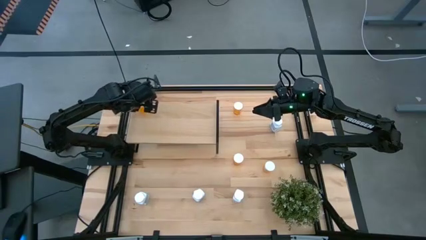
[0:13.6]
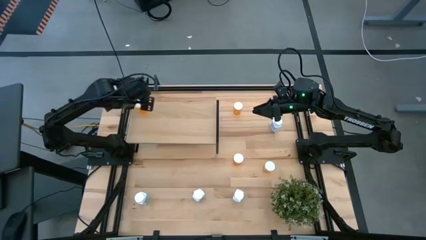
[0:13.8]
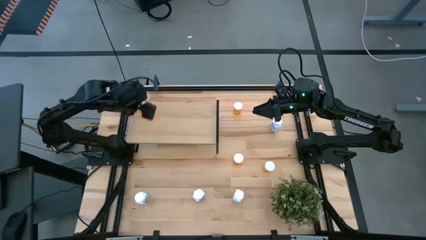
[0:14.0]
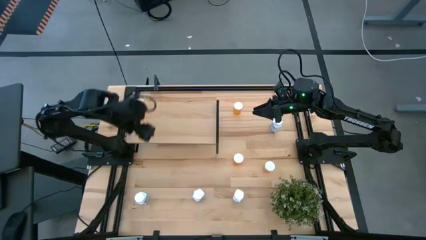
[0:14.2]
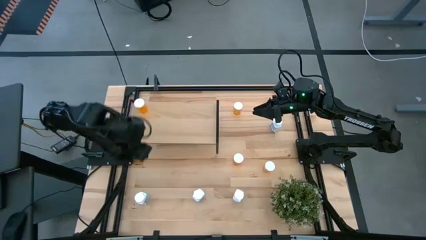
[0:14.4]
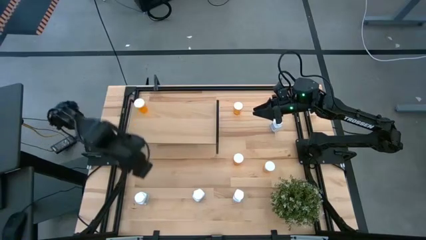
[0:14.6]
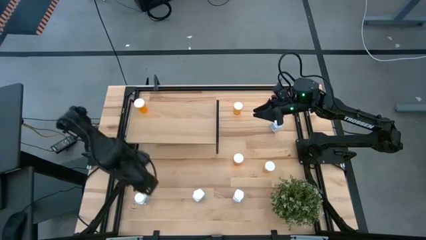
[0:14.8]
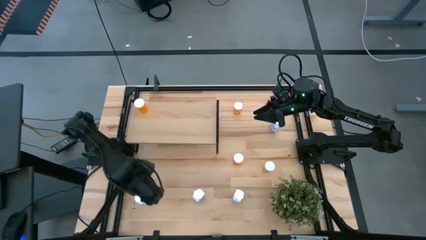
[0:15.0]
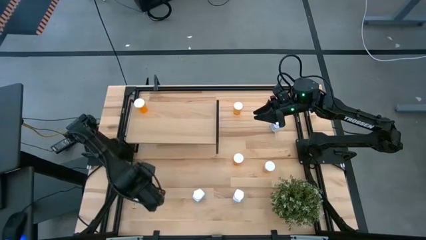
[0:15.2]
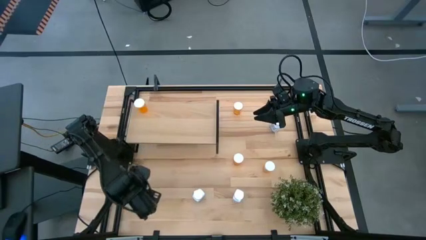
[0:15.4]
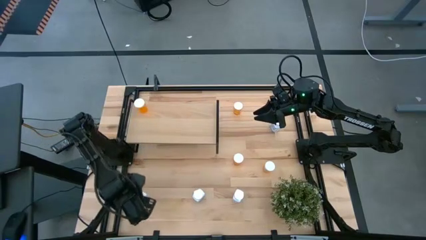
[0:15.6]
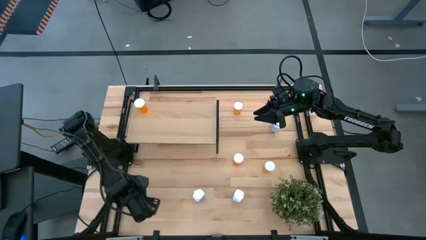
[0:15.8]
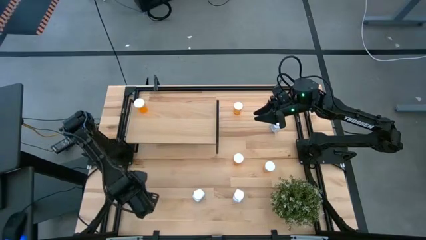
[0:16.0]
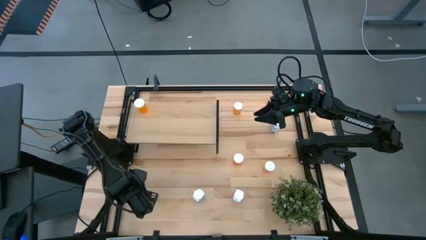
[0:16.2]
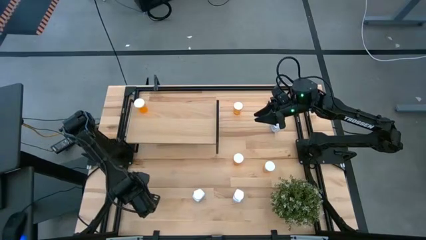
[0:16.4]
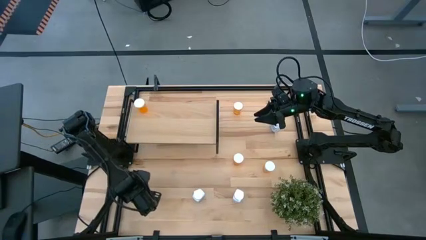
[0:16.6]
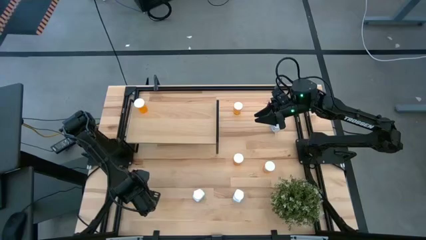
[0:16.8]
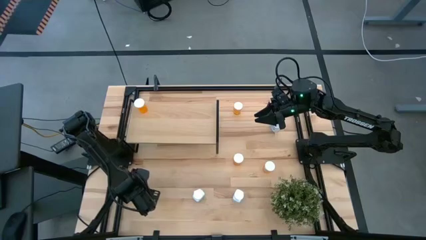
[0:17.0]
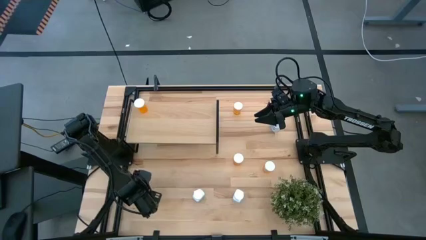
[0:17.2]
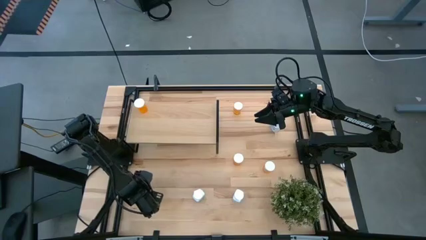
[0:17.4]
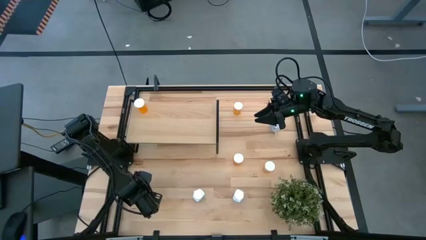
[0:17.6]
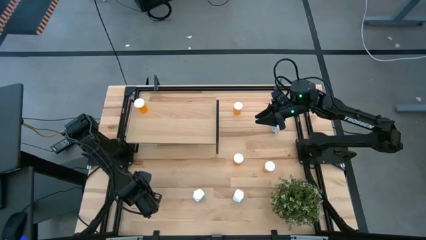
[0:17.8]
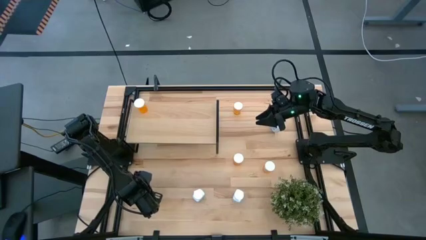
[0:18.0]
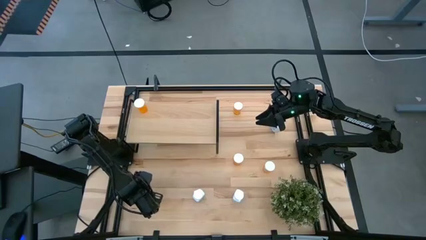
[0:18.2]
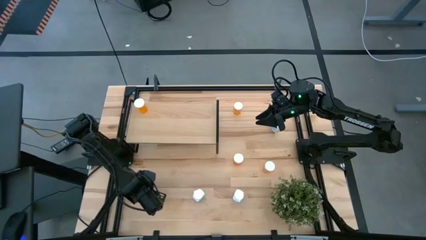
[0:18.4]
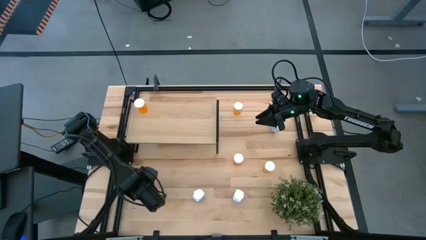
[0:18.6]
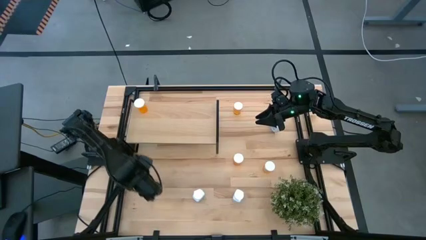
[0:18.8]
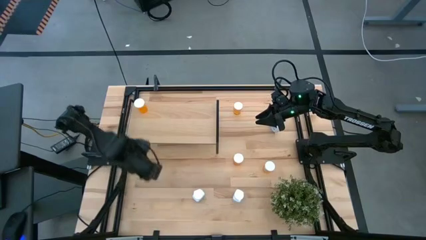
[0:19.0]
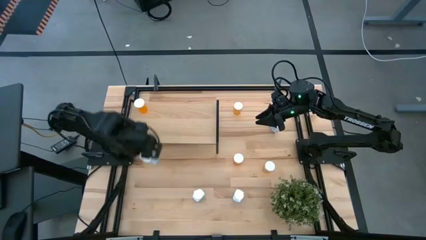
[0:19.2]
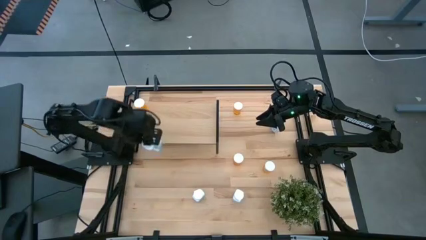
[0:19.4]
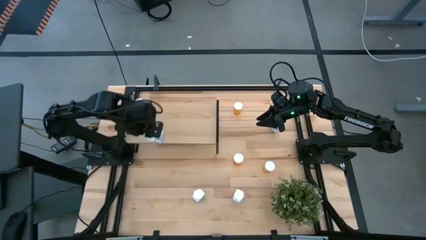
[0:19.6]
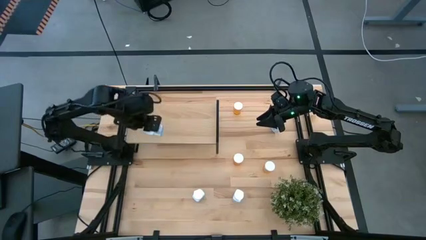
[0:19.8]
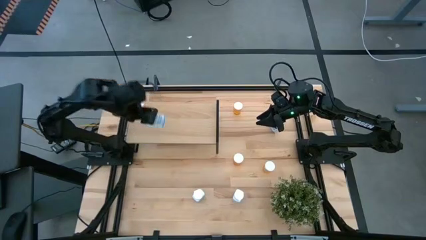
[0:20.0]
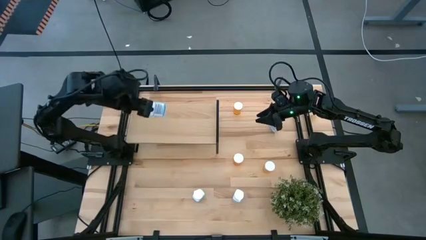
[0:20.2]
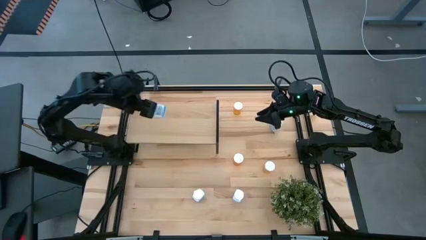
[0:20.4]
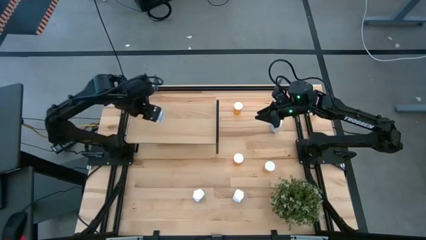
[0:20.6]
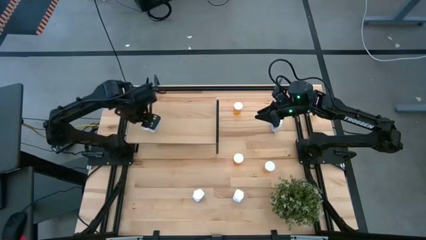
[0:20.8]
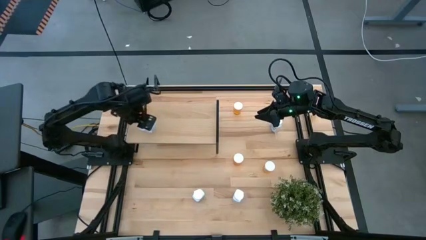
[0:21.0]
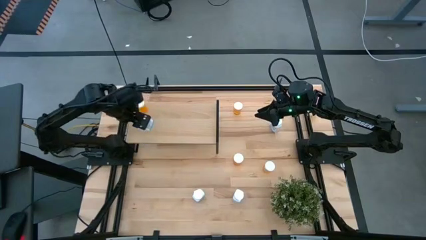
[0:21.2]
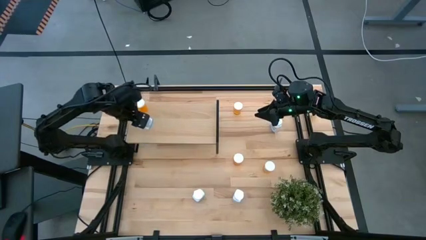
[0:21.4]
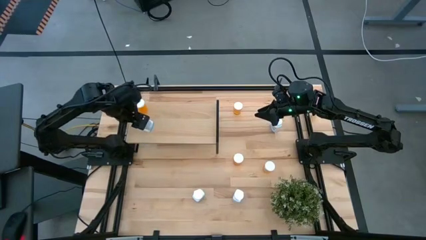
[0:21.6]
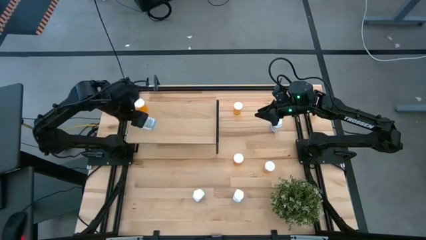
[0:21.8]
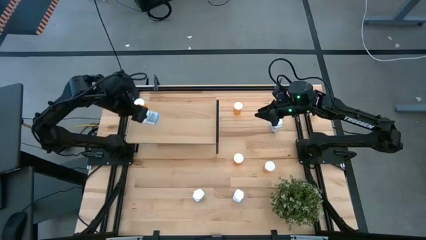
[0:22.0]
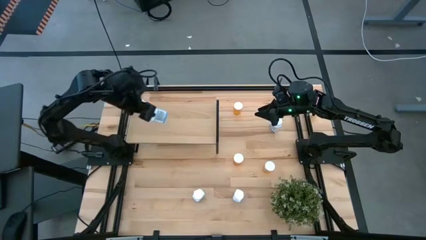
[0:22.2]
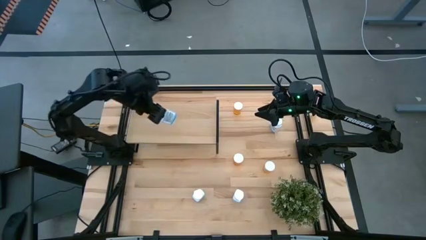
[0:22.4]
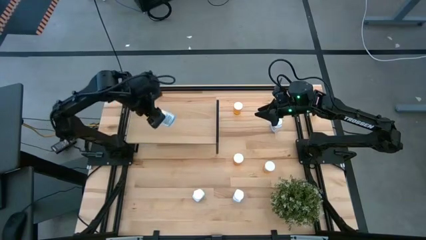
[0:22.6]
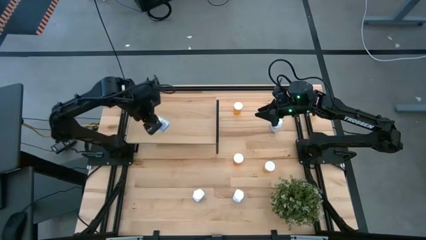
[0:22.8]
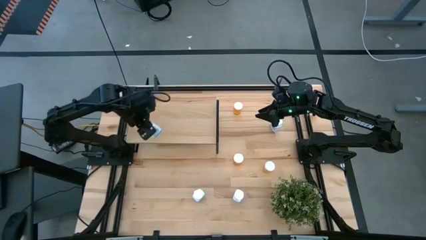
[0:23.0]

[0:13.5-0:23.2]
Task: Pick and place medicine bottles onto shelf by color
Put the white pill bottle on the shelf

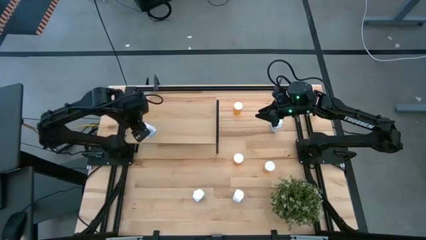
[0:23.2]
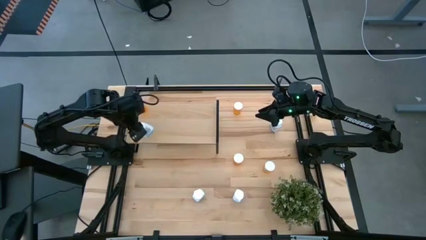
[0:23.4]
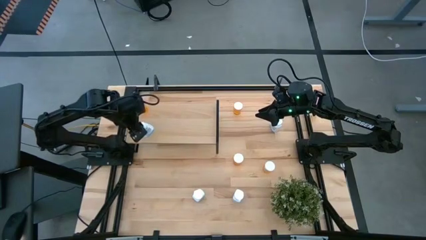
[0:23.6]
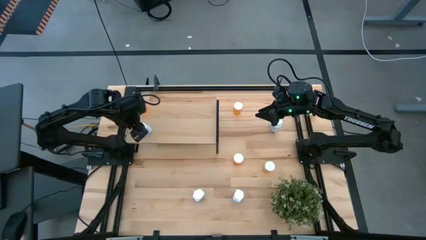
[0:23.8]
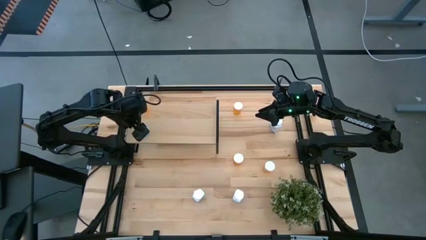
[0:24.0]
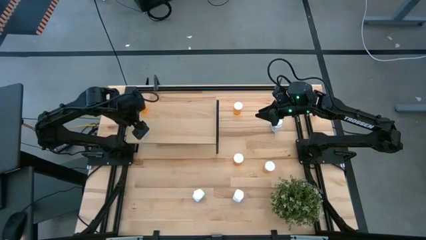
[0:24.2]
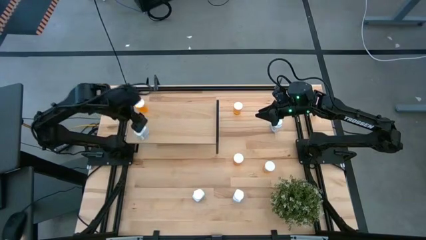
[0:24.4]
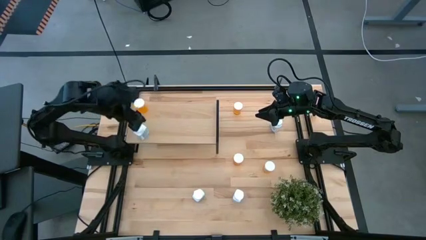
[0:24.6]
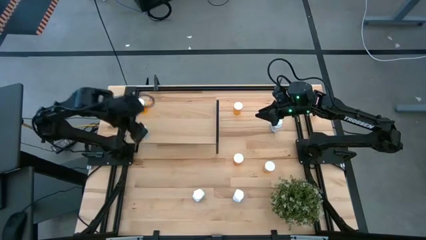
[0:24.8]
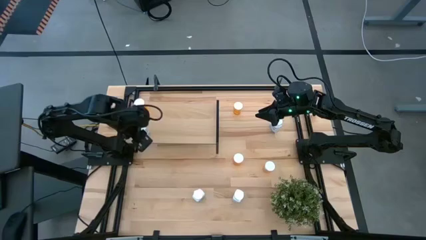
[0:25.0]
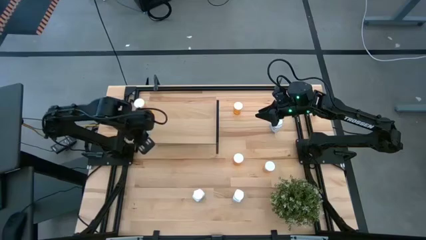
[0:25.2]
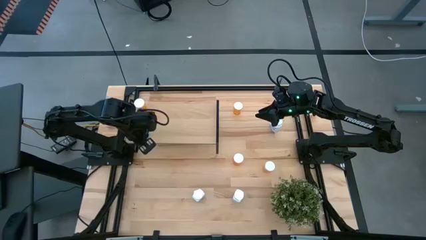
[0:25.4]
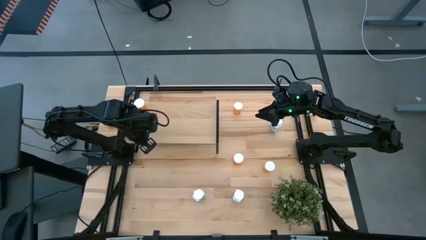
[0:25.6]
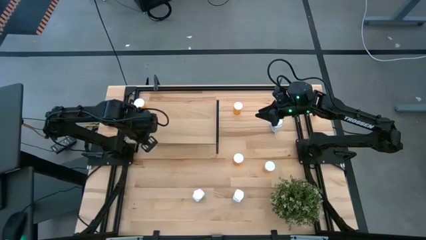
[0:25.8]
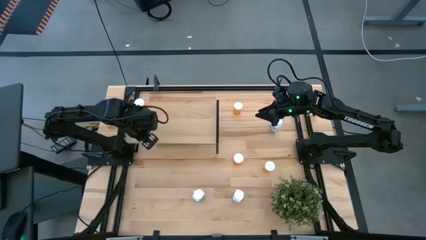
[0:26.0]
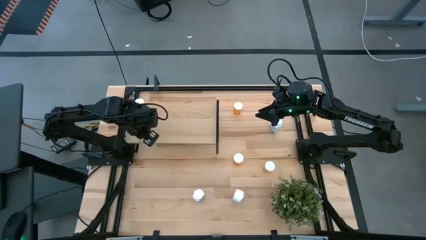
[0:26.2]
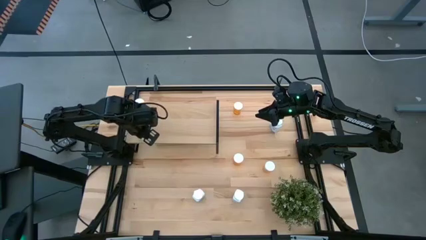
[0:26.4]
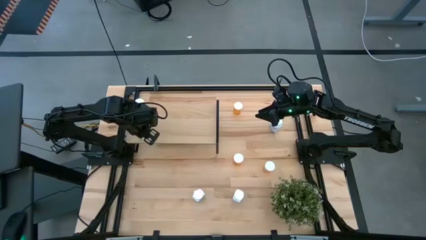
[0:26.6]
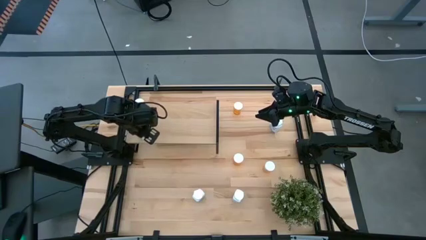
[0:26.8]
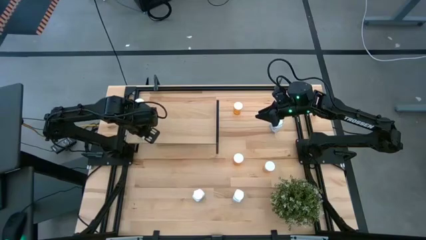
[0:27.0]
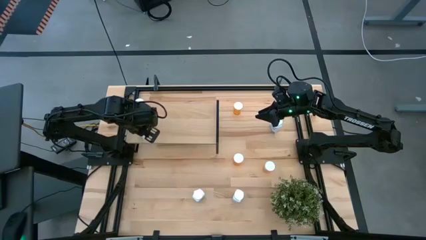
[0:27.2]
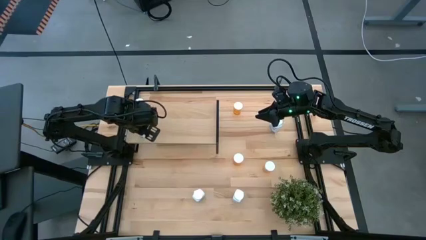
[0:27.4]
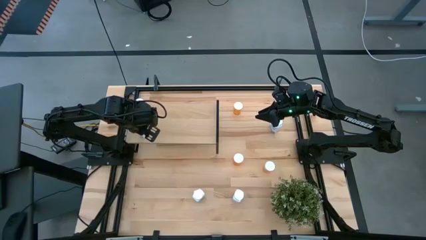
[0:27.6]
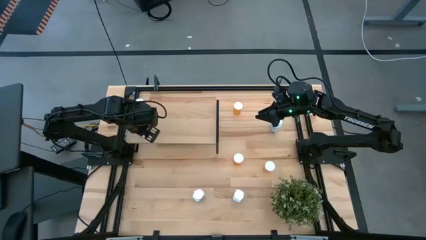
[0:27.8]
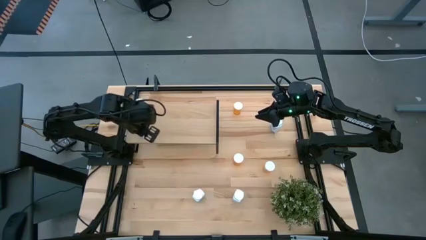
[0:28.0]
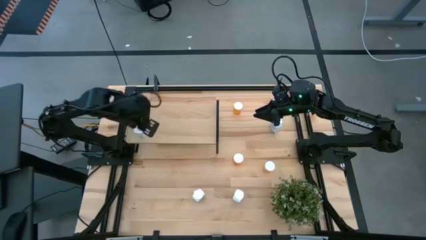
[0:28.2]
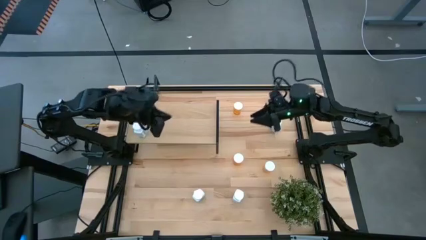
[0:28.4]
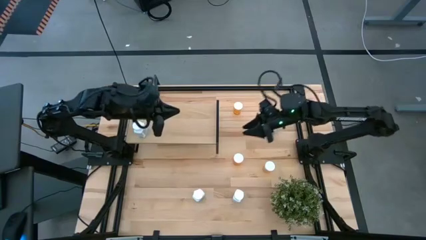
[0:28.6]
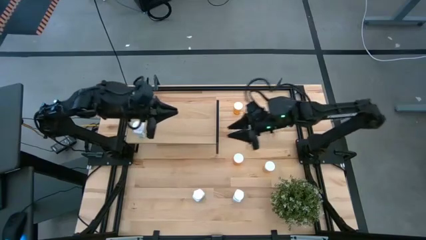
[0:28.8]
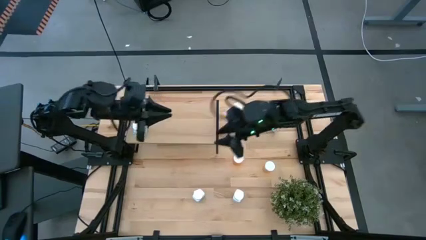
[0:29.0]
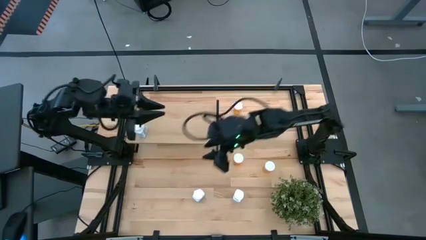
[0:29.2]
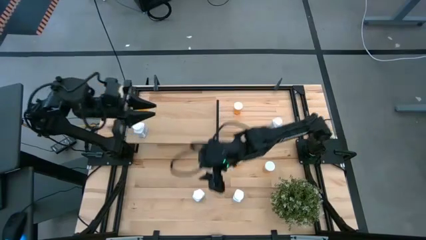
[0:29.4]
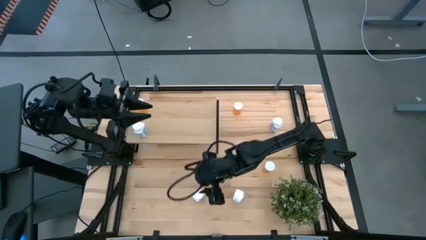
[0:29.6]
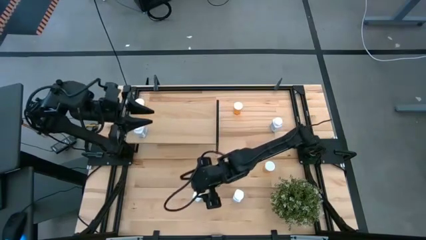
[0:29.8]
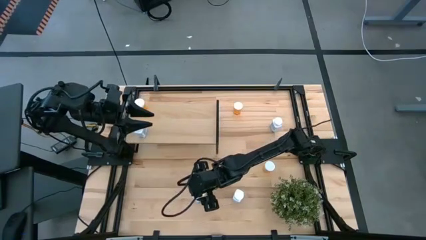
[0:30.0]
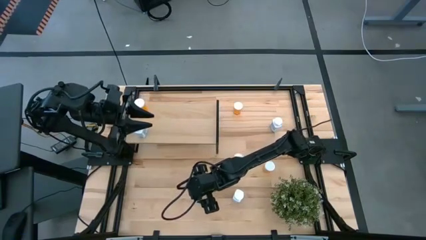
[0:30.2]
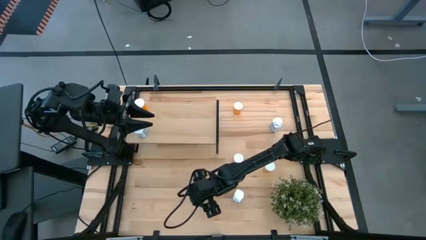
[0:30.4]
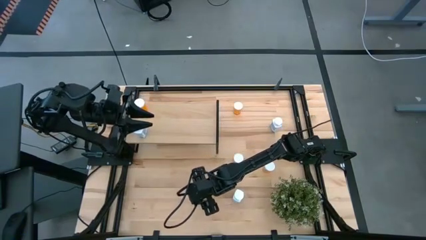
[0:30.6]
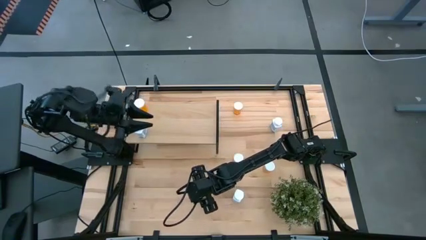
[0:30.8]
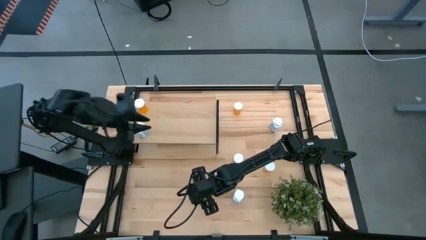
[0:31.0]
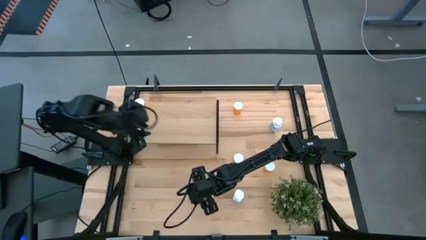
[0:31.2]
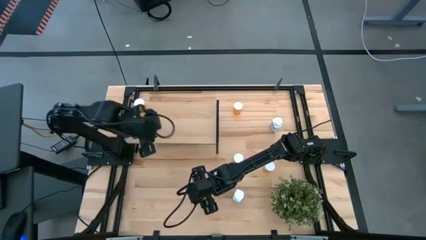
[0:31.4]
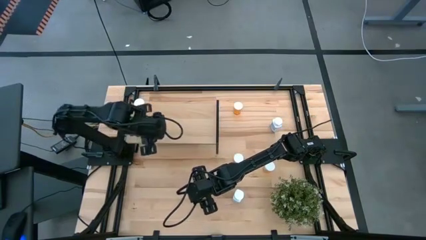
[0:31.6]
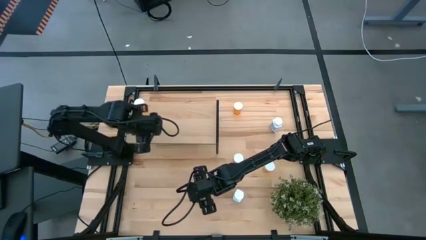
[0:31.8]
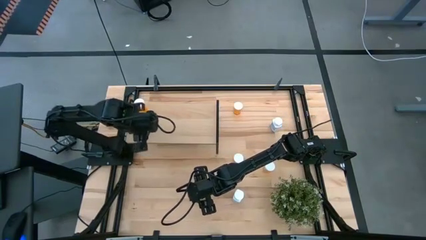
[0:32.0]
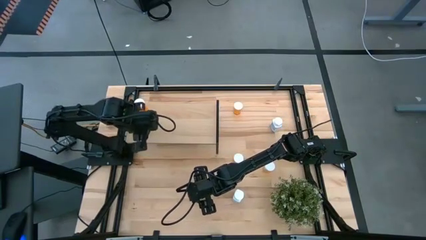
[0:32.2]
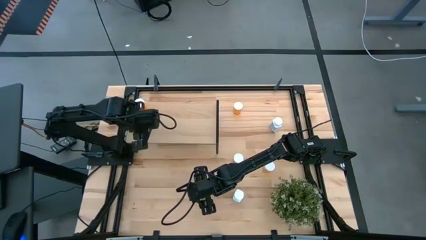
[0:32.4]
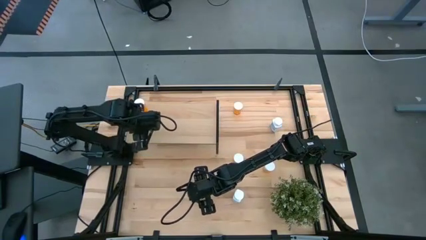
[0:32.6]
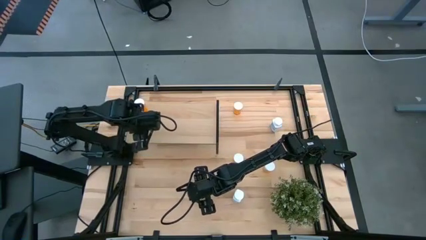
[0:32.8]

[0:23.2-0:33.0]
Put the white pill bottle on the shelf
